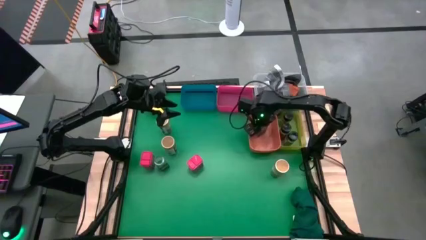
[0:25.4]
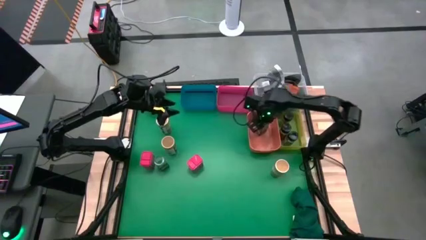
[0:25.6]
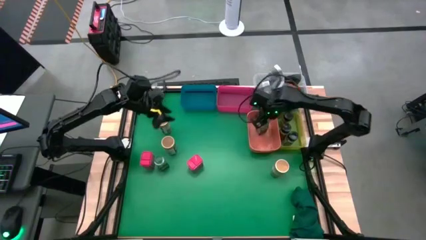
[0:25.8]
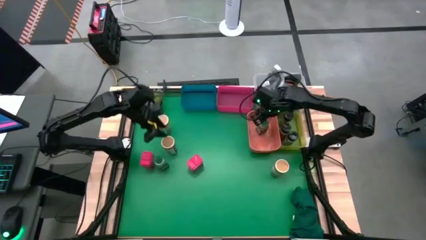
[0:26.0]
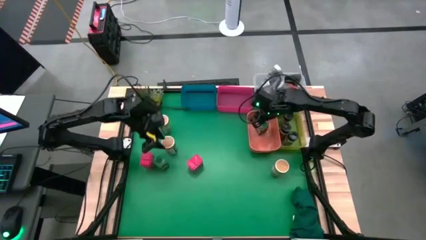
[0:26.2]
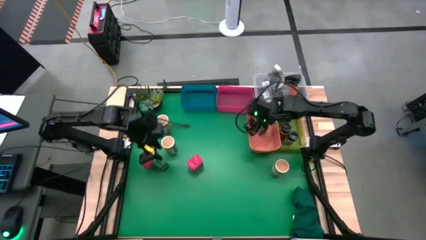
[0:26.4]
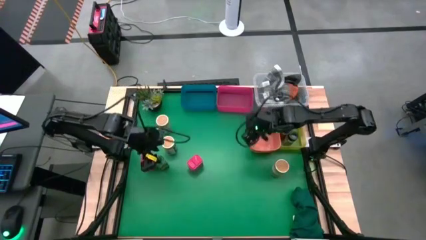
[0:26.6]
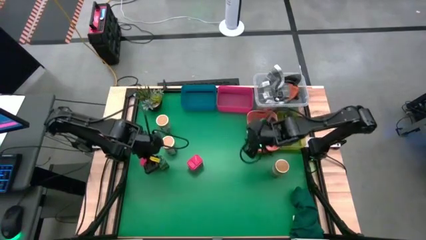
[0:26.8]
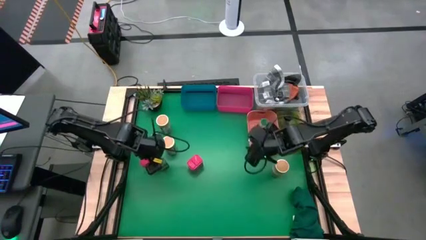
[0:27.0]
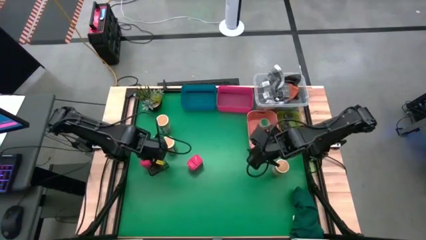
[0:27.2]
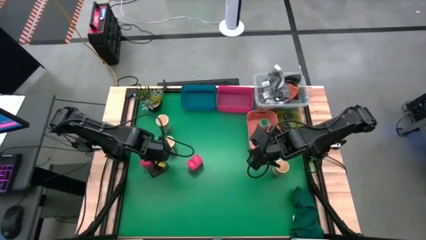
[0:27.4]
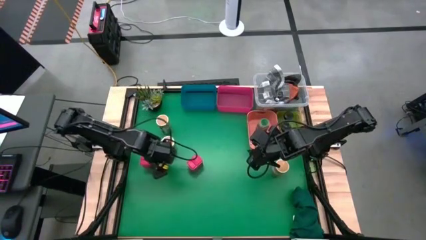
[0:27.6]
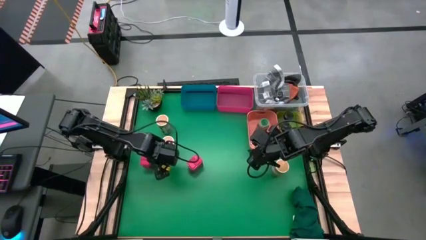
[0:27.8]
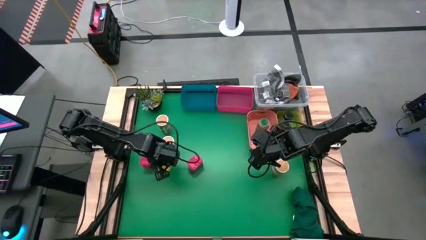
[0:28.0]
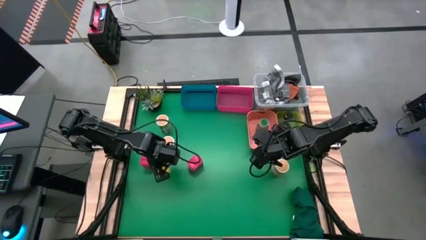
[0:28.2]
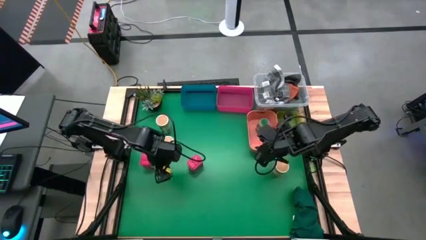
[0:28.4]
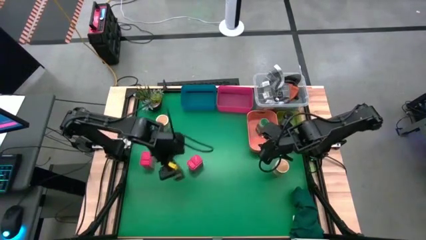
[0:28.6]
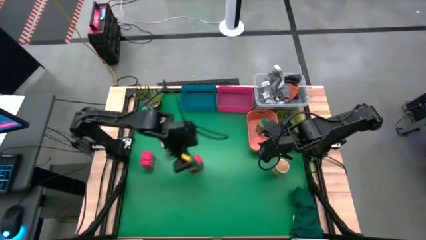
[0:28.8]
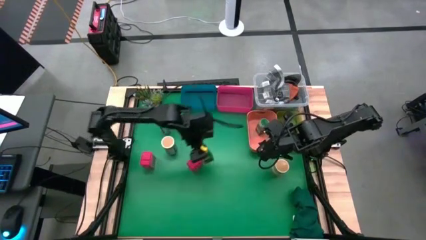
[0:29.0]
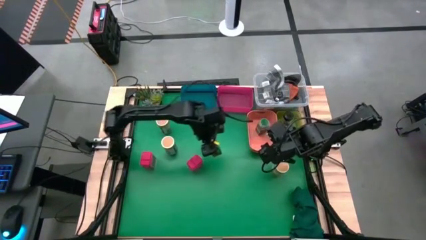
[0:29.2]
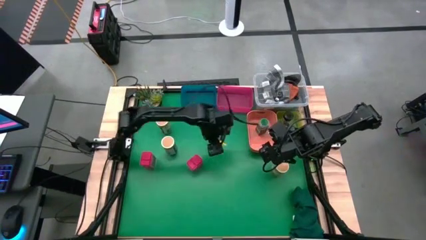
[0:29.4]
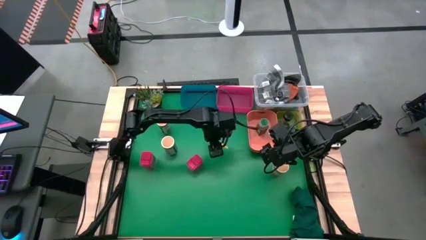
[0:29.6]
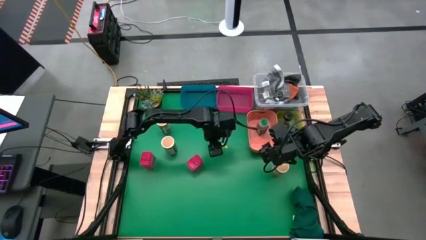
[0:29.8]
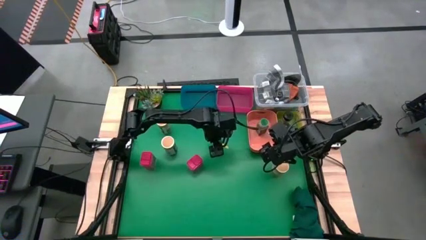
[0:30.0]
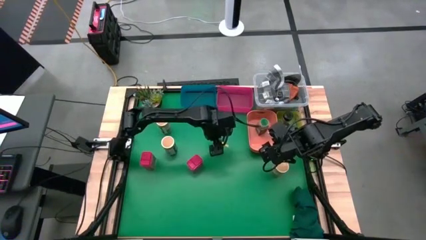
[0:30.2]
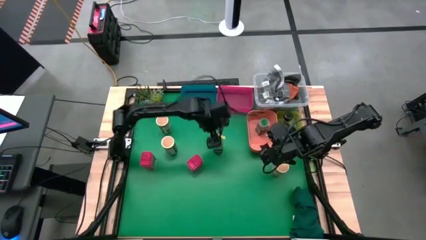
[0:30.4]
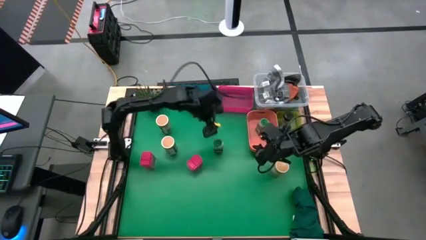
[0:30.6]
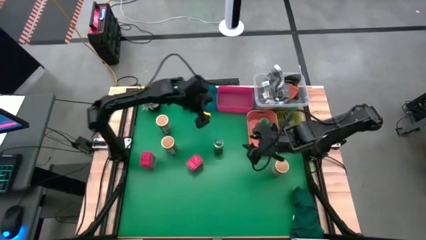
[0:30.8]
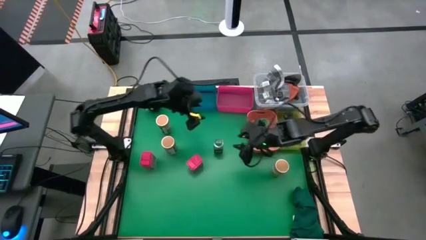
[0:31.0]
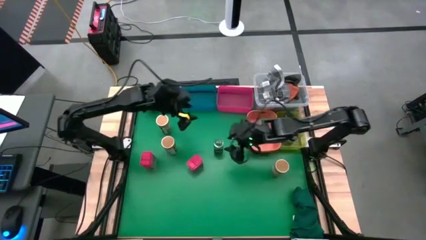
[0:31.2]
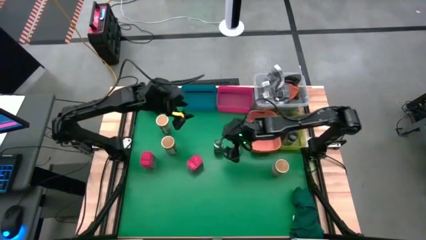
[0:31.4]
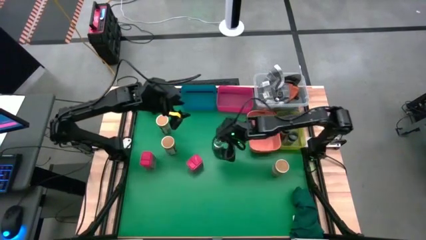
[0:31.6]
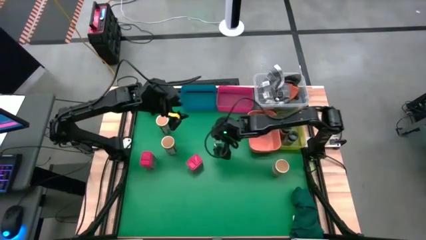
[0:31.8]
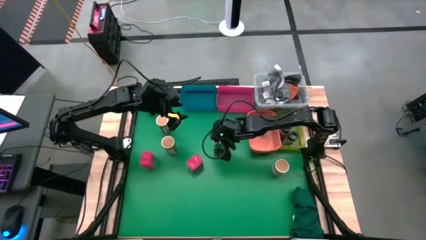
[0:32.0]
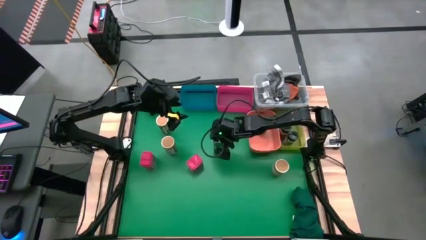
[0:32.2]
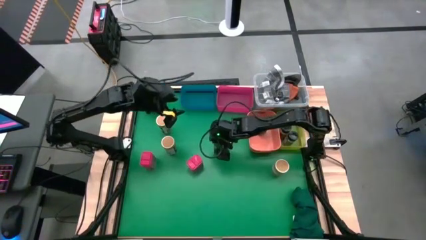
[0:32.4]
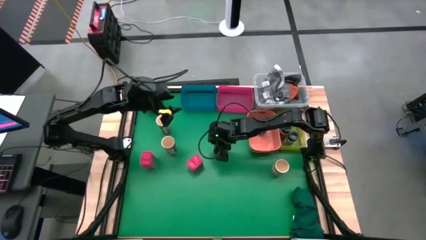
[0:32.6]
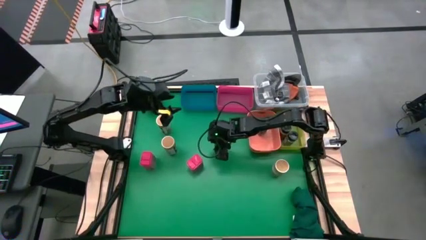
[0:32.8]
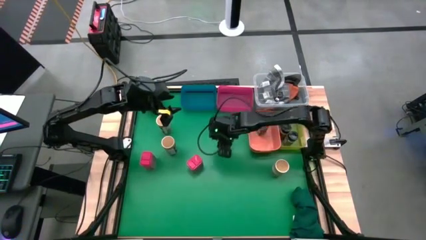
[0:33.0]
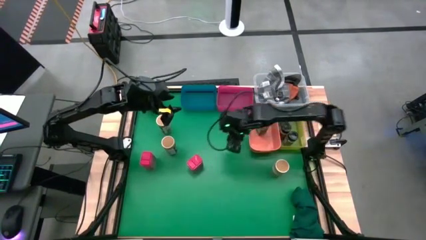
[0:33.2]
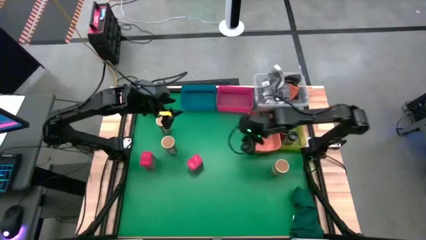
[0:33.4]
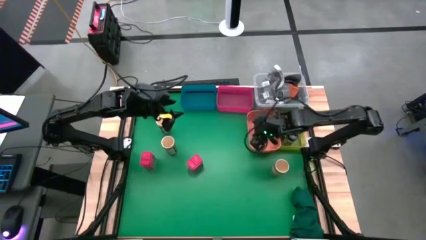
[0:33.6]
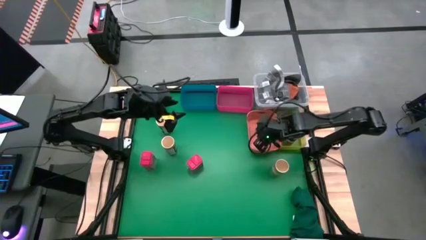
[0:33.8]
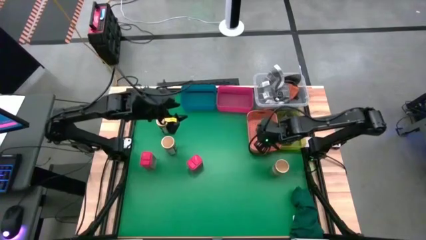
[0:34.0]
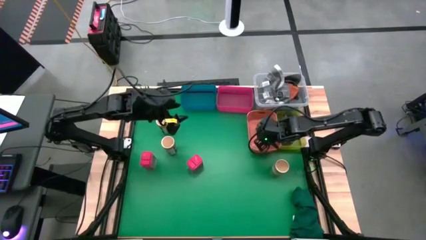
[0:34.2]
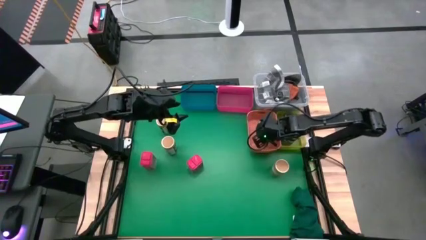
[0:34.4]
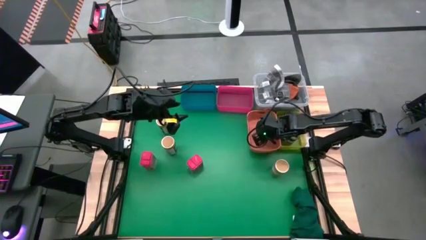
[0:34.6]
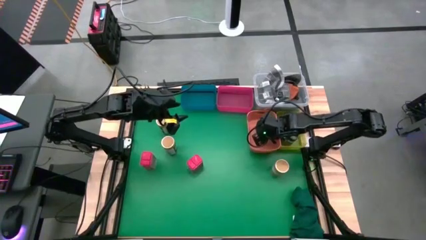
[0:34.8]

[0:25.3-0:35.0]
Task: Sort spices by type
Put the green seasoning bottle into the orange bin

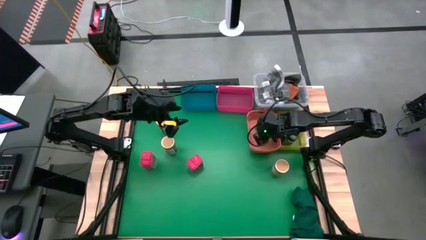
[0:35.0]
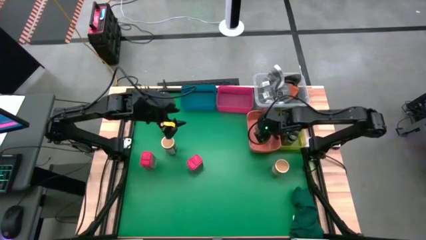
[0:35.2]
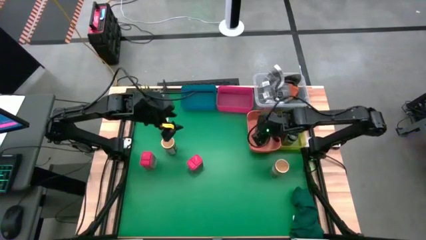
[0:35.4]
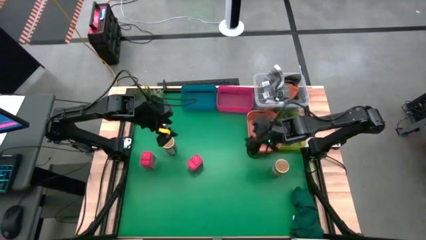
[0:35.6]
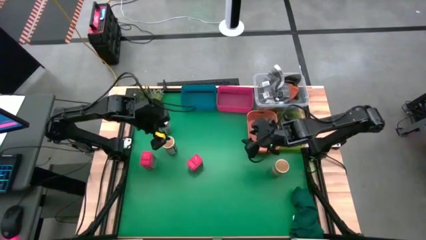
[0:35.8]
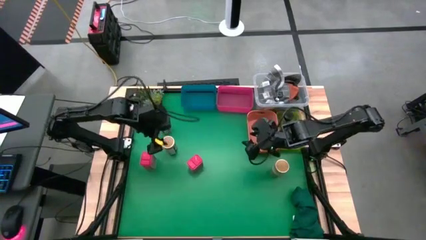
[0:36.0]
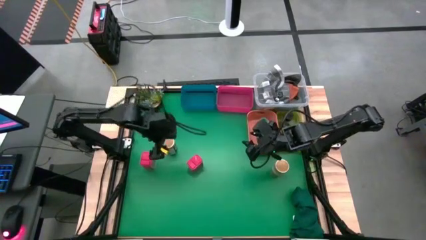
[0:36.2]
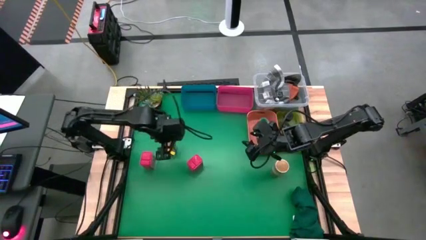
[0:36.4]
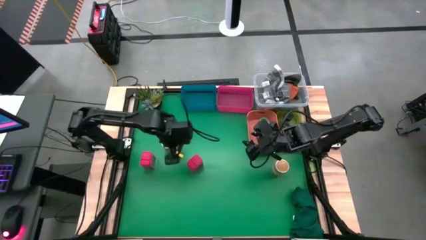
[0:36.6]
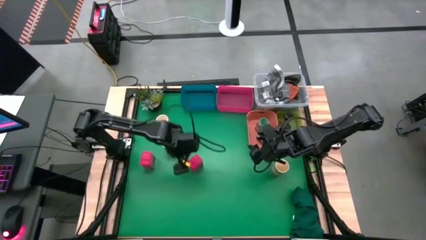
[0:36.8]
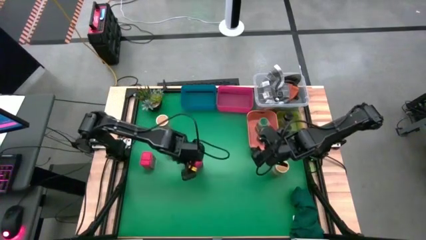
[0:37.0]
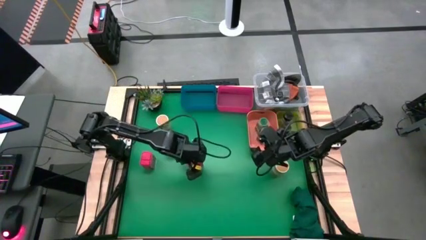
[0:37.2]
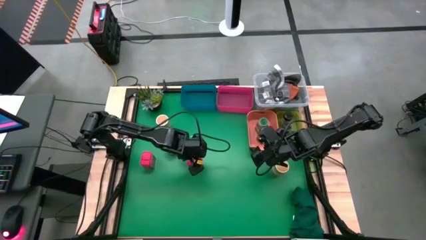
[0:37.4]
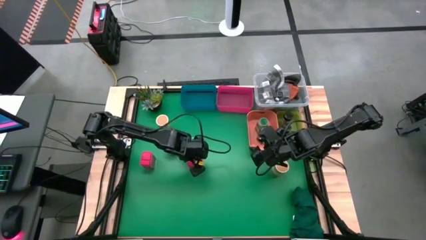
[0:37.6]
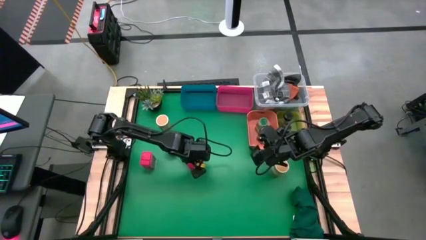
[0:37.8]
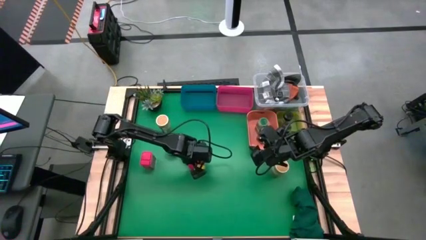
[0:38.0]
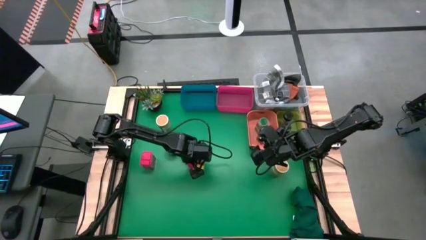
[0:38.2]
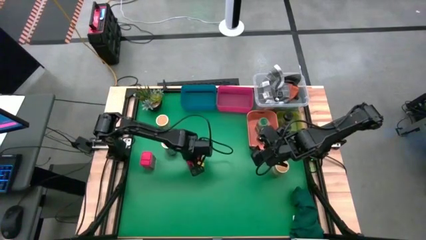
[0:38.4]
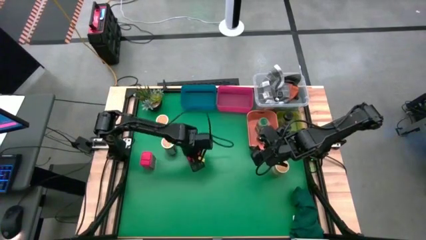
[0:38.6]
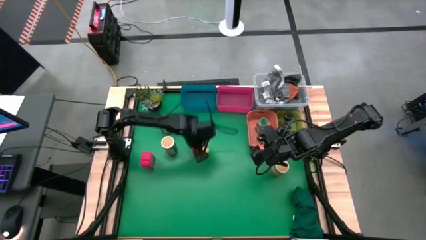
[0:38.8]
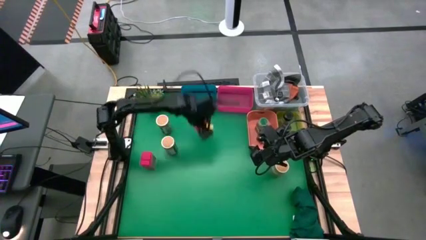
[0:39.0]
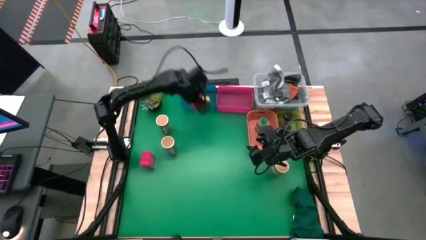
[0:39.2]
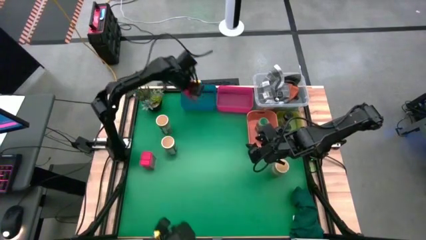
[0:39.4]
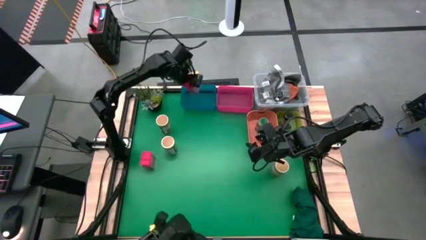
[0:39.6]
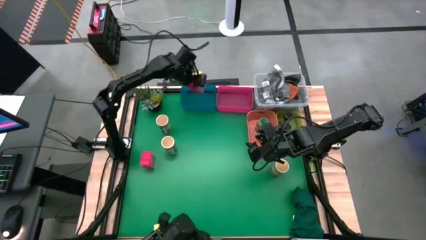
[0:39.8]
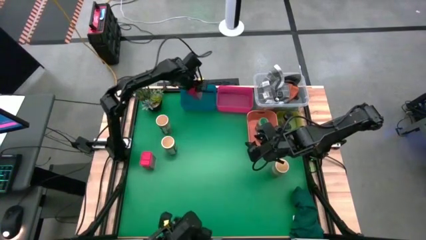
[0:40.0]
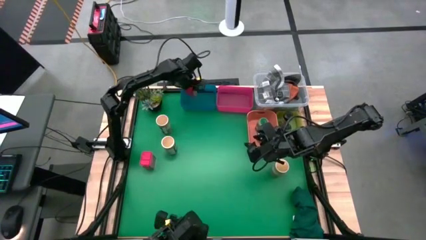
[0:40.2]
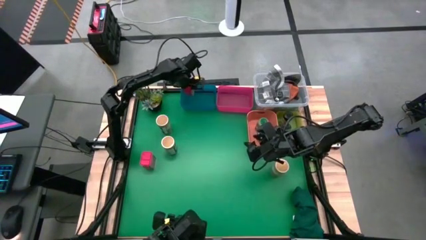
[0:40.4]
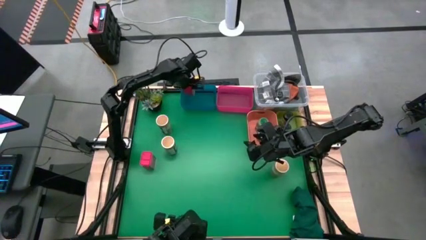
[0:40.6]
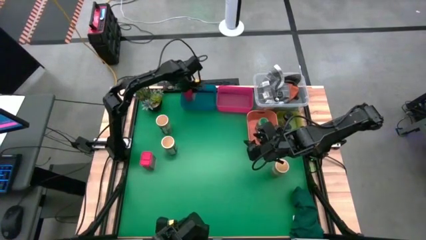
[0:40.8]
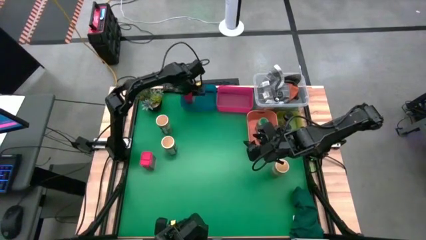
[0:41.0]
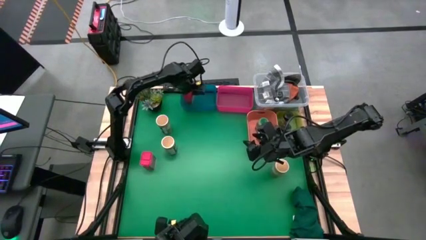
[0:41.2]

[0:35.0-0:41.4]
Put the right red seasoning can into the blue bin
